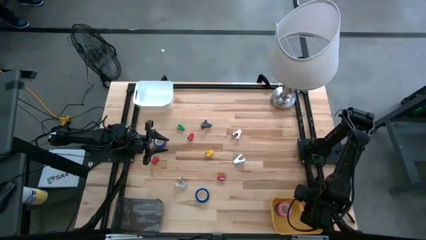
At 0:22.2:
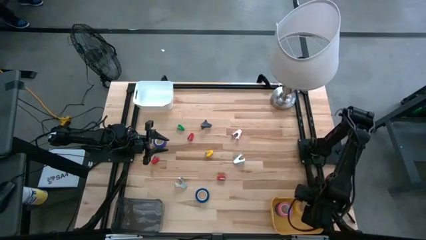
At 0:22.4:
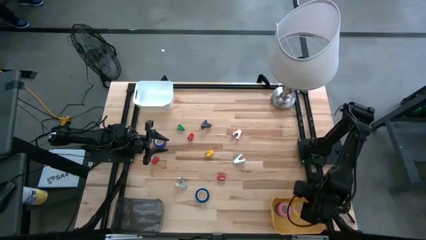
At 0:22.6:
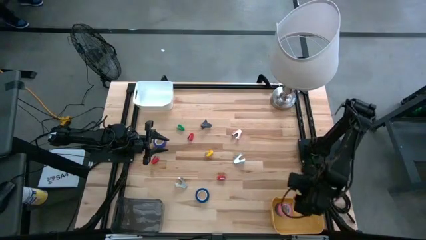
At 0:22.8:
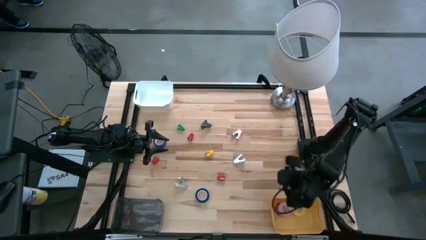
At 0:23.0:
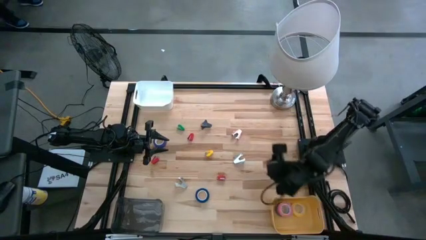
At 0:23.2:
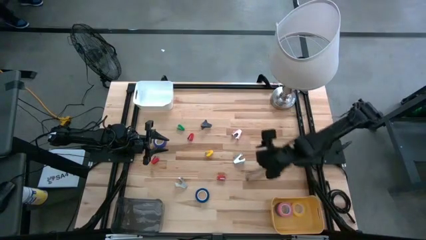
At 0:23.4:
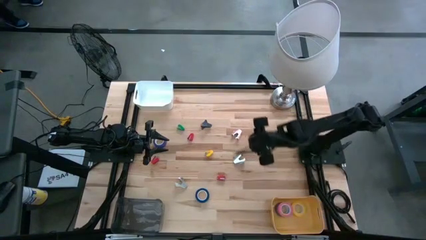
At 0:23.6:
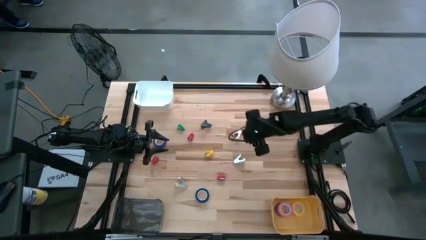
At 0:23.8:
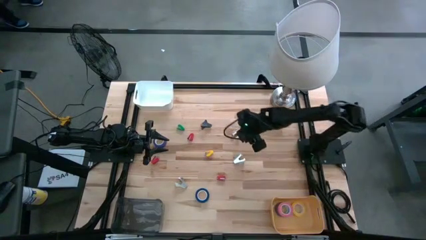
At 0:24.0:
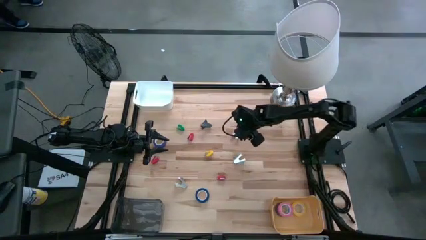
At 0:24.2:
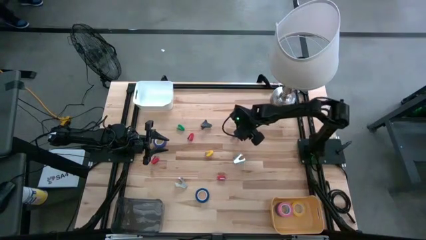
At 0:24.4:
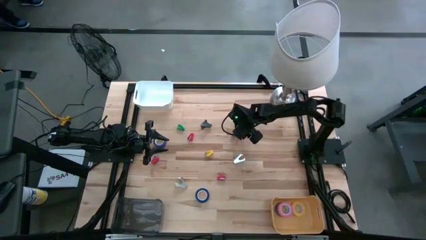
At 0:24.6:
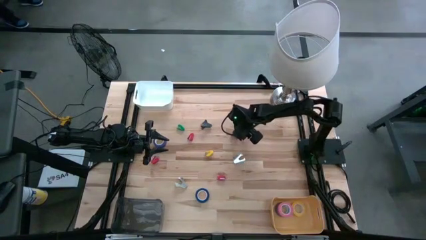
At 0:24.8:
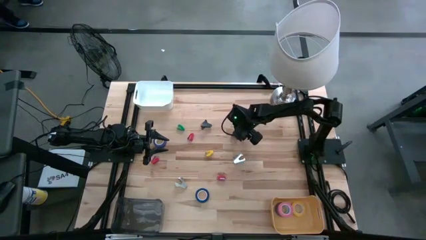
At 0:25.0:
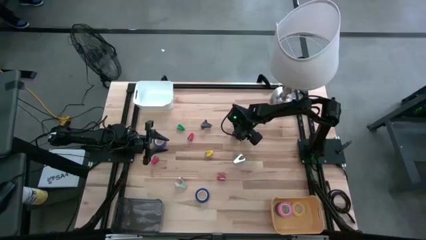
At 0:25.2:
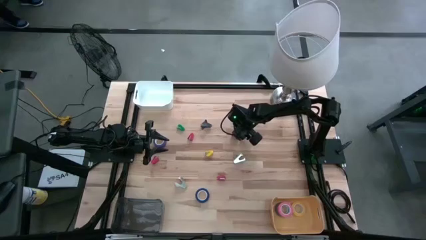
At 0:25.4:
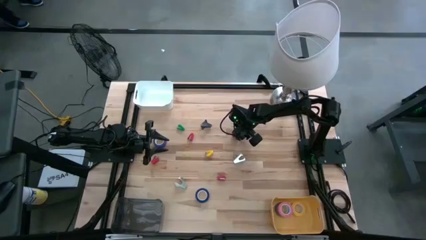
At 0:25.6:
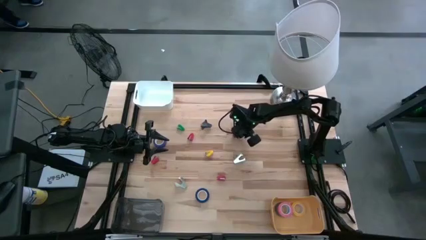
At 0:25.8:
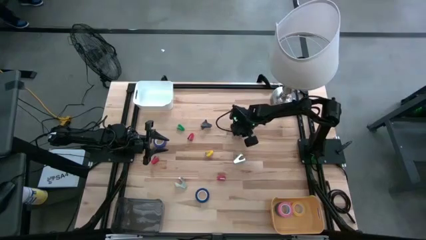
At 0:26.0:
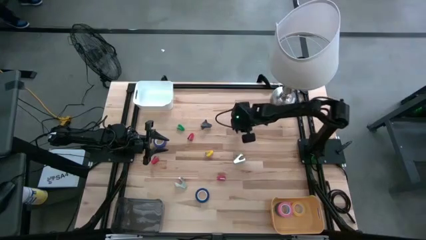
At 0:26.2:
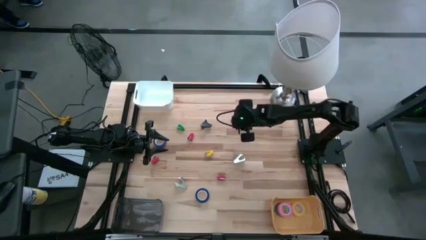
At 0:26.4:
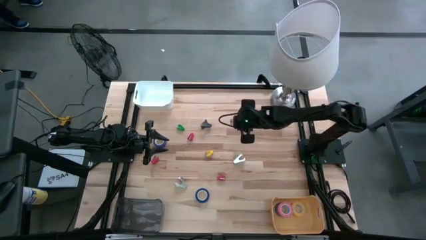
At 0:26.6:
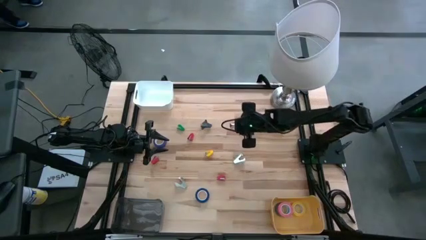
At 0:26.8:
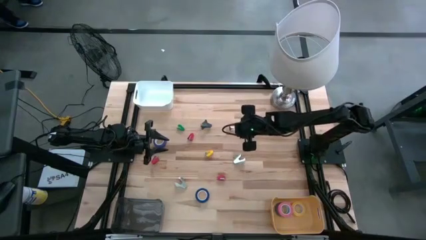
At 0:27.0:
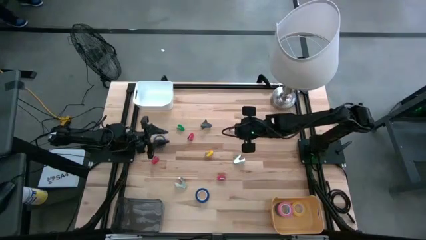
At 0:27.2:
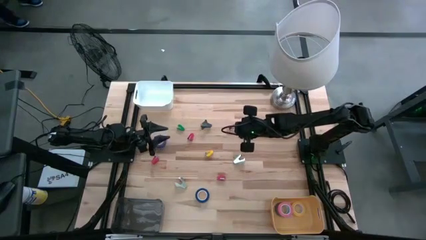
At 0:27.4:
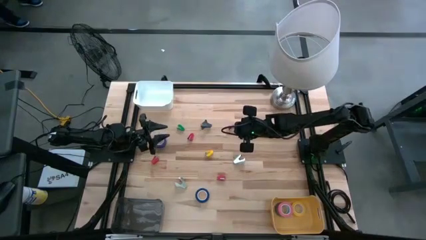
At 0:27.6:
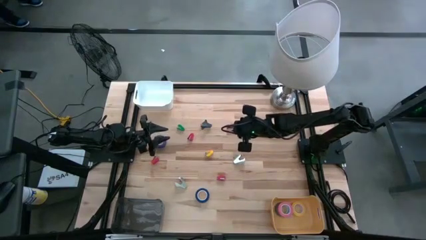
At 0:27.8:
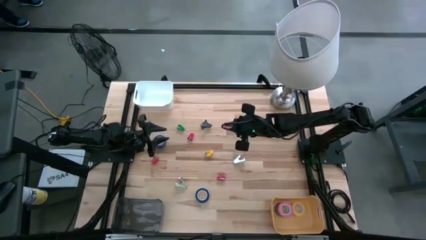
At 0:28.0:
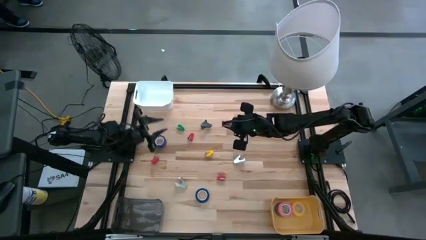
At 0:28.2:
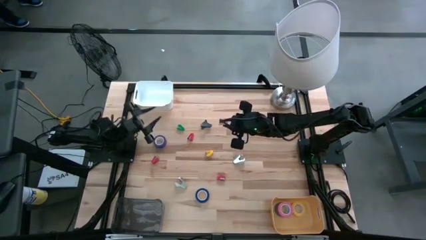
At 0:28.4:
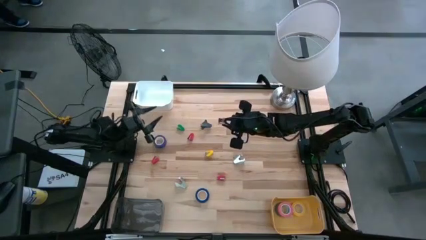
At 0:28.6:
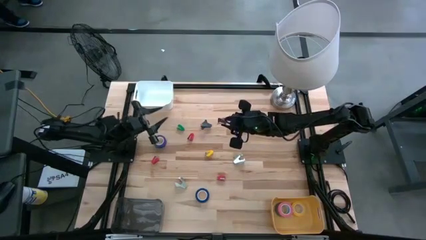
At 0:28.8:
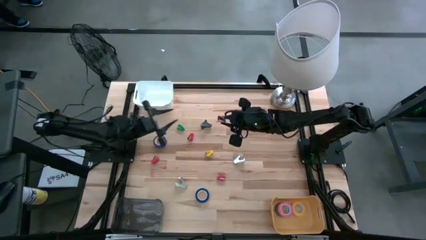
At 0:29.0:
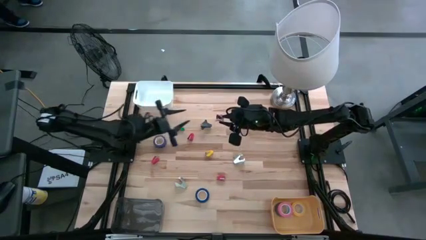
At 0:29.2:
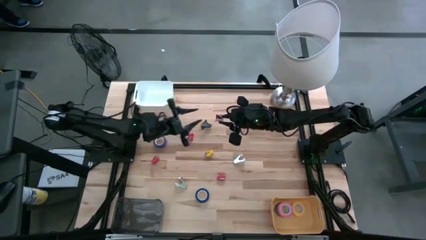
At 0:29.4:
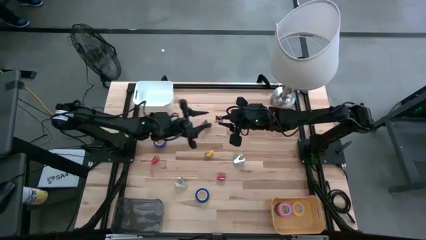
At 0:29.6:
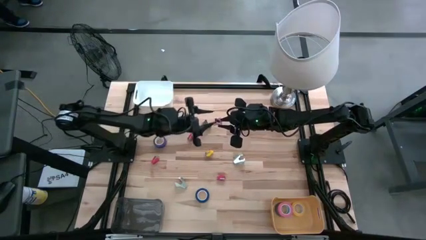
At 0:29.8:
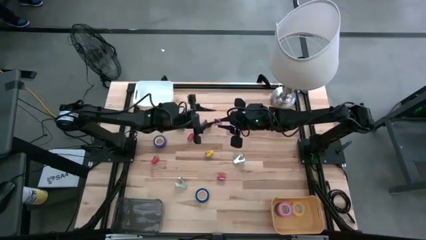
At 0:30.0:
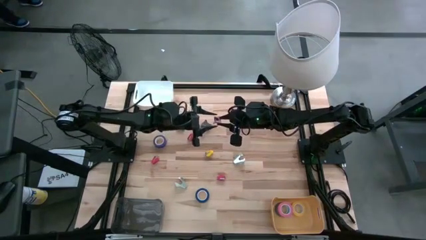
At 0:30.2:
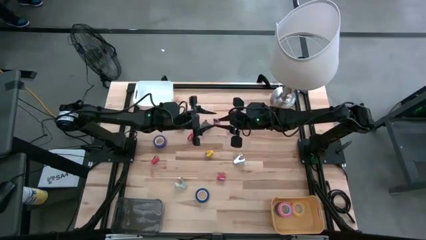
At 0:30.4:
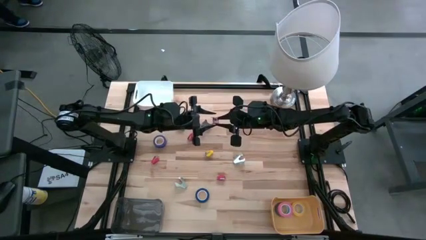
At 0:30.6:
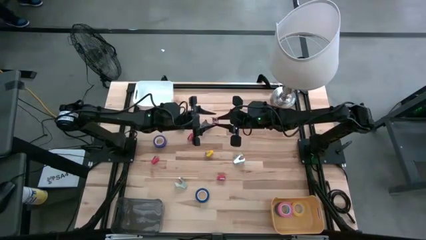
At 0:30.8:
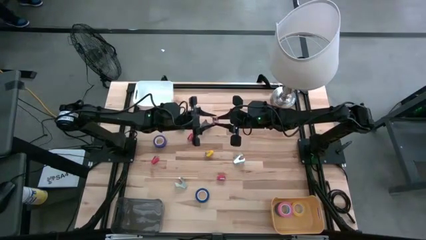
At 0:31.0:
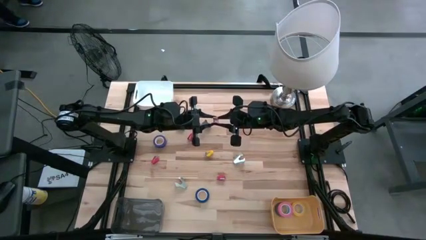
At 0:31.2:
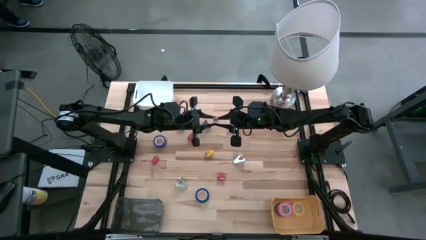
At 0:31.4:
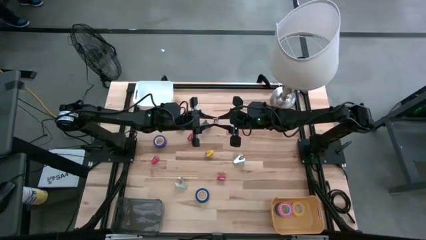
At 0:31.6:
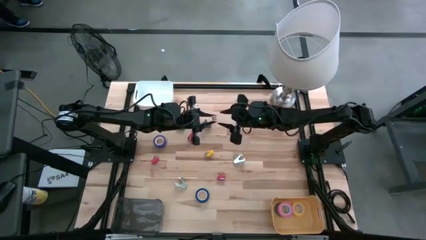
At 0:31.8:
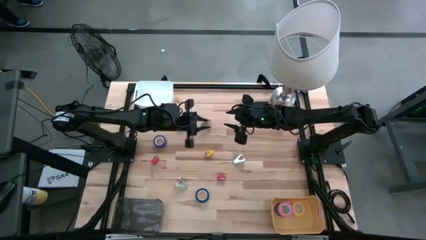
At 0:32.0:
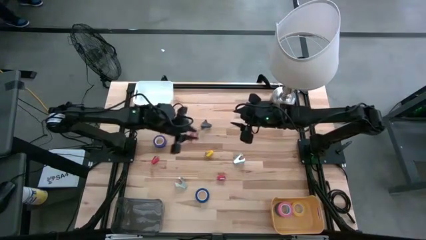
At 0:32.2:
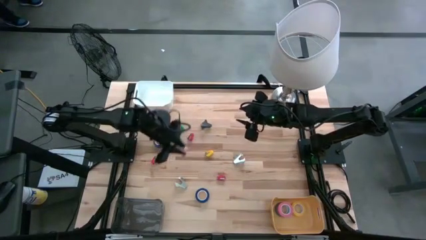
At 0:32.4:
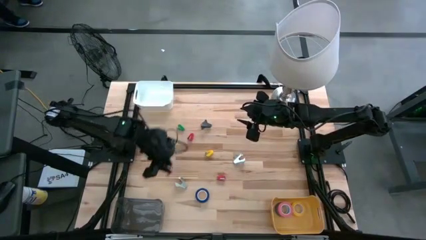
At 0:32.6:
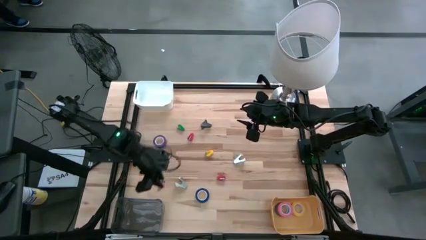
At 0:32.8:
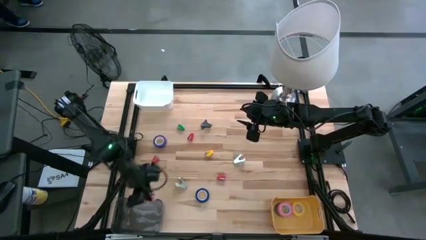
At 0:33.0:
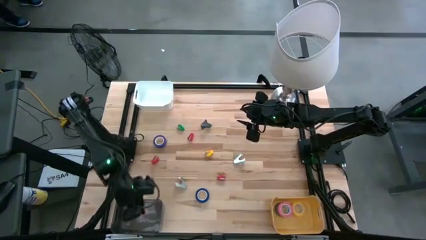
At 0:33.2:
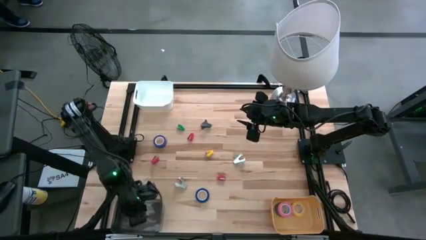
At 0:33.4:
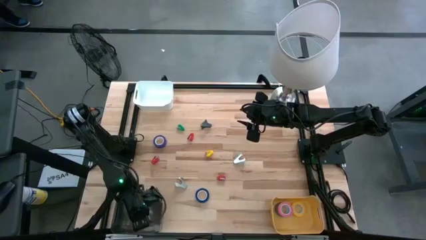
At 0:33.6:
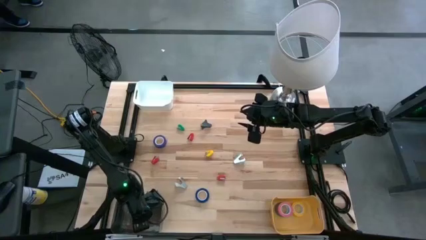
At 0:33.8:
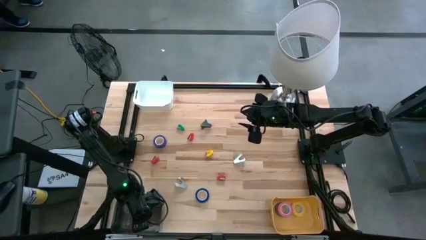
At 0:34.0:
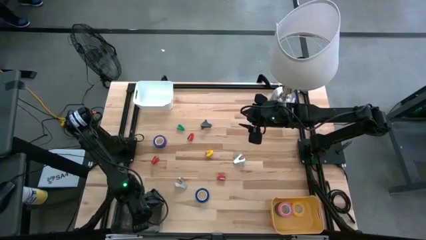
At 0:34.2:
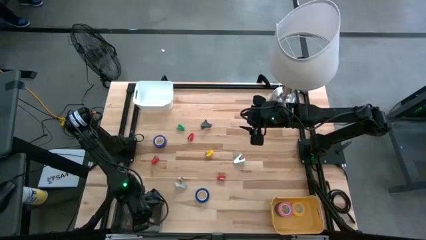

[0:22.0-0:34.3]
Task: Pick and place Stapler, Stapler remover, tape
Put the pink staple remover into the black bin

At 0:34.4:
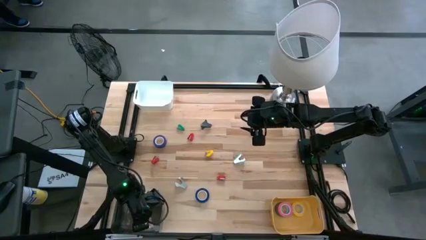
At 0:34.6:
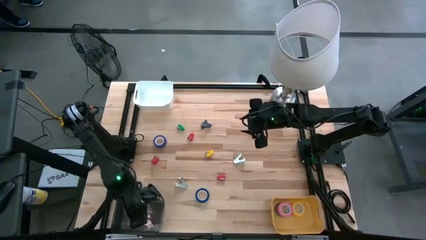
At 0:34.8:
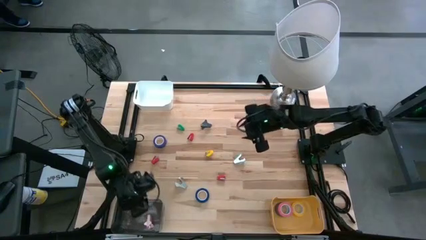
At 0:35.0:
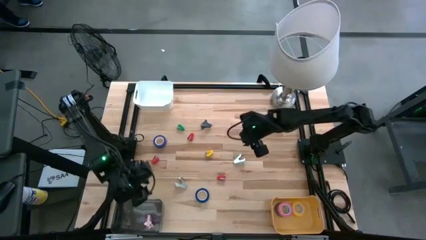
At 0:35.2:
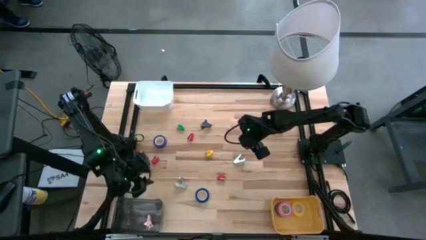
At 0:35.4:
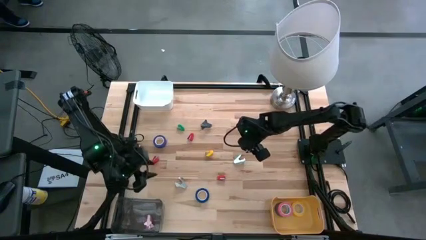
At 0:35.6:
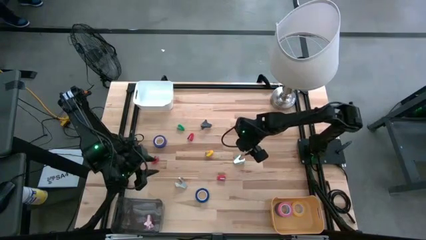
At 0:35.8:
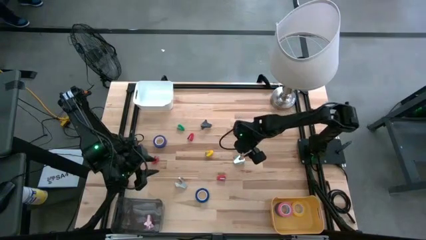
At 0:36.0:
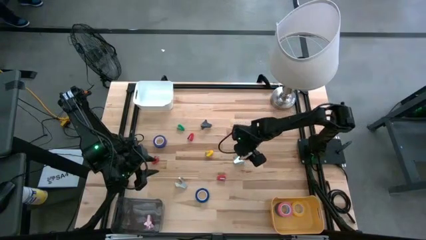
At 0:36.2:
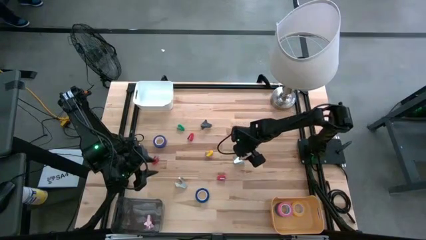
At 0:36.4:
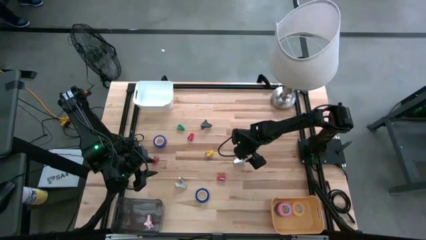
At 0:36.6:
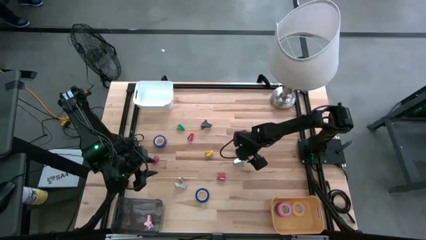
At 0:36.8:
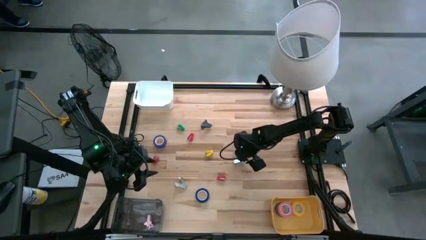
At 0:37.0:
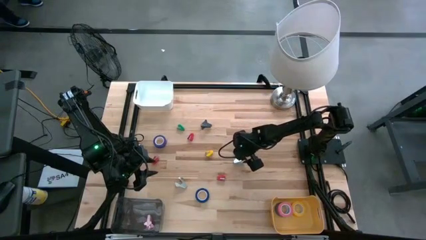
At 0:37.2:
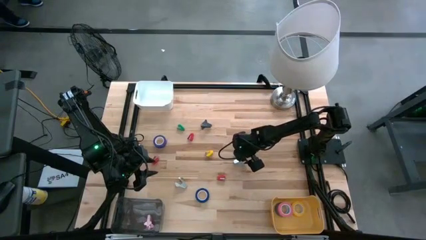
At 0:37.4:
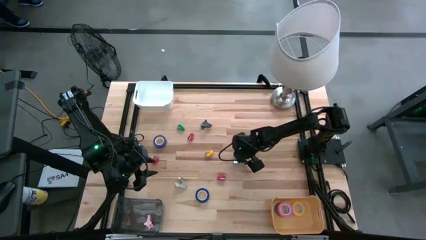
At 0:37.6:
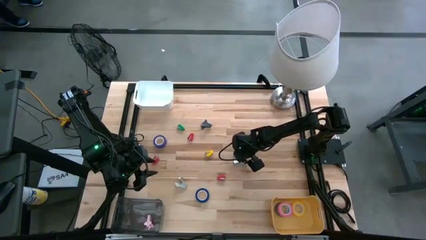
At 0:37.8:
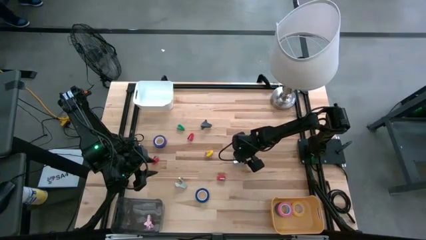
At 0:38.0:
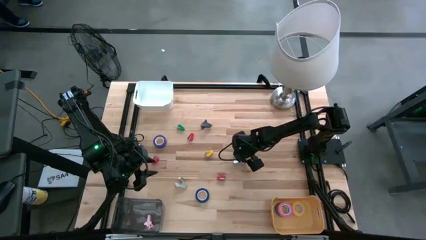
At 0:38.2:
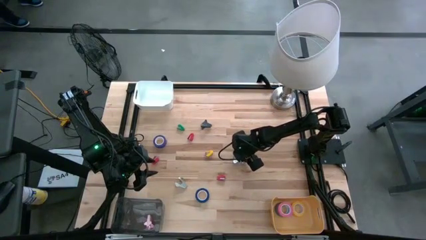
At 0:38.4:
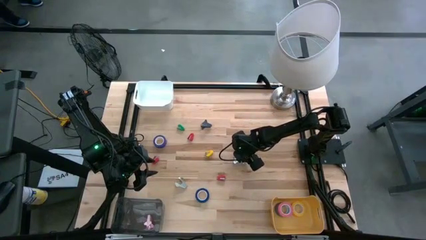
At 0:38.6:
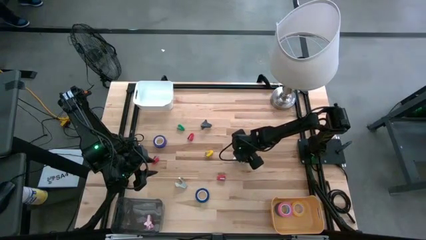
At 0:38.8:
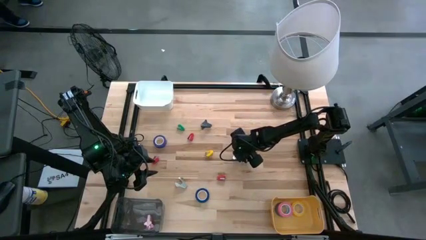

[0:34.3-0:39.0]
Put the blue staple remover into the black bin
